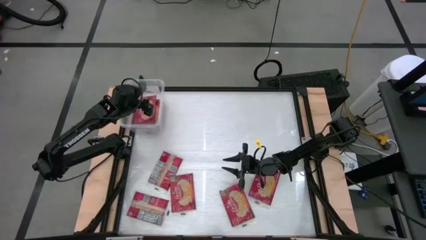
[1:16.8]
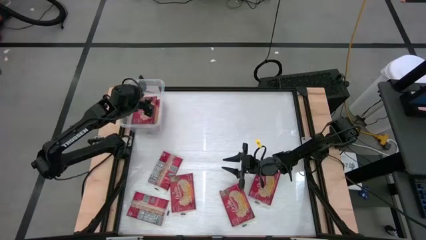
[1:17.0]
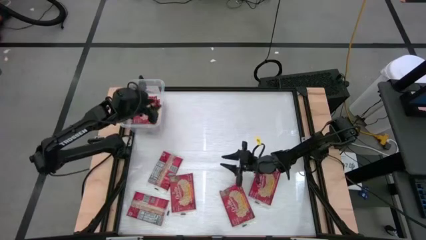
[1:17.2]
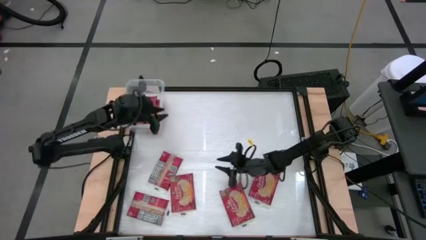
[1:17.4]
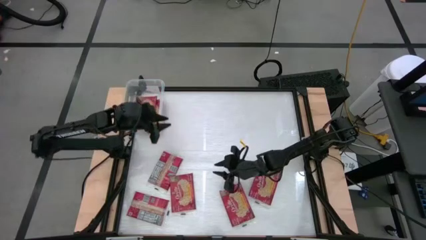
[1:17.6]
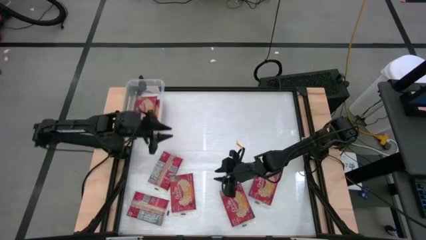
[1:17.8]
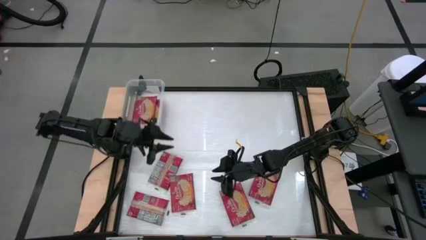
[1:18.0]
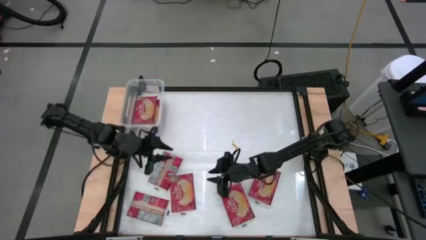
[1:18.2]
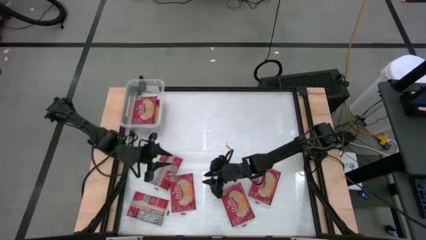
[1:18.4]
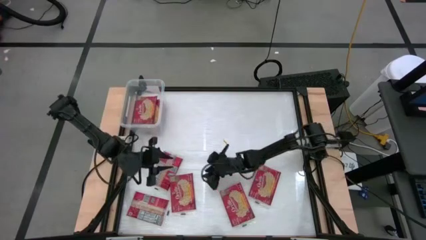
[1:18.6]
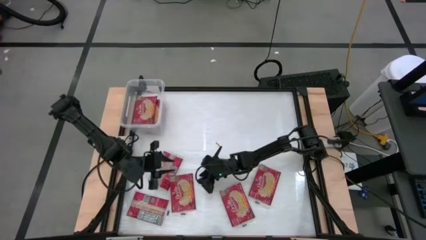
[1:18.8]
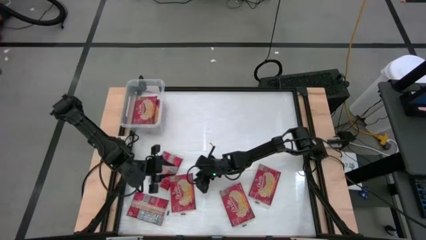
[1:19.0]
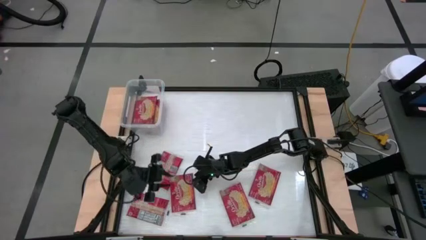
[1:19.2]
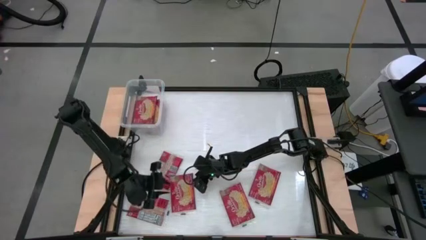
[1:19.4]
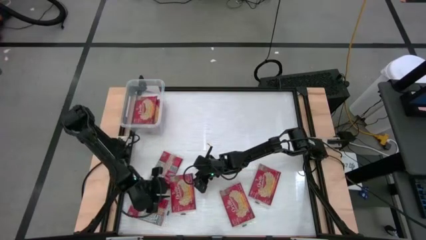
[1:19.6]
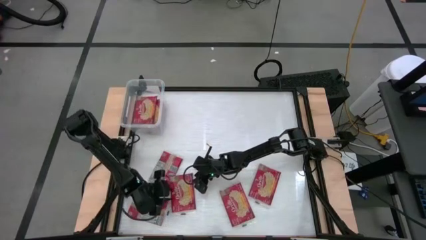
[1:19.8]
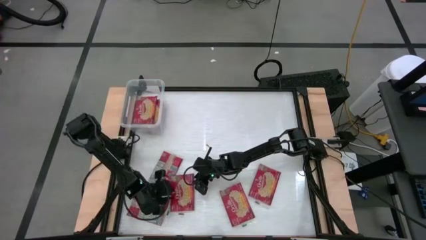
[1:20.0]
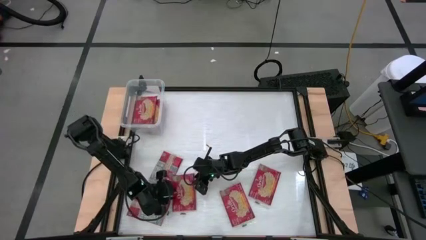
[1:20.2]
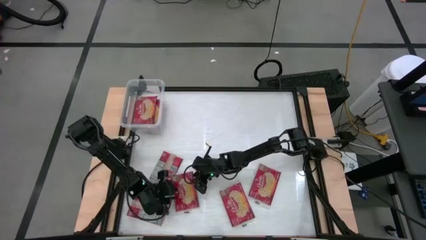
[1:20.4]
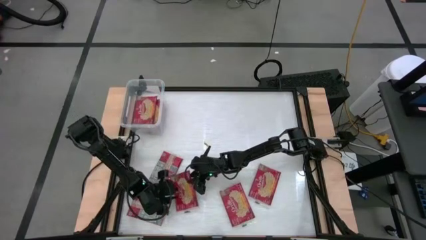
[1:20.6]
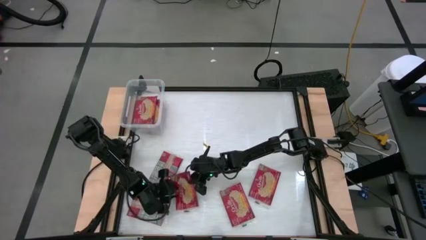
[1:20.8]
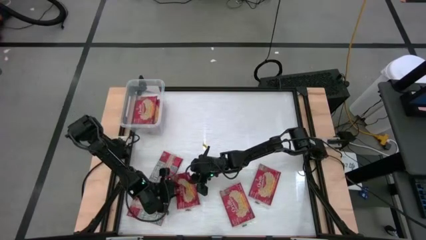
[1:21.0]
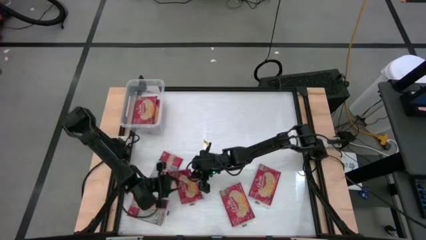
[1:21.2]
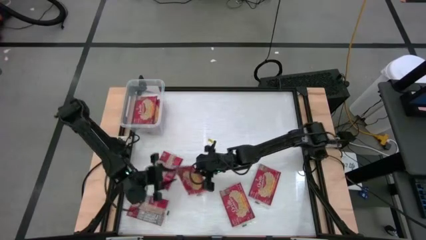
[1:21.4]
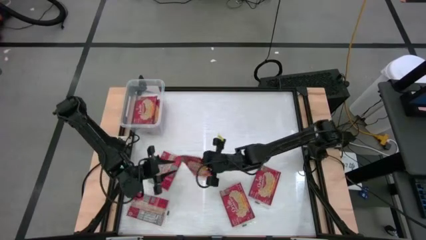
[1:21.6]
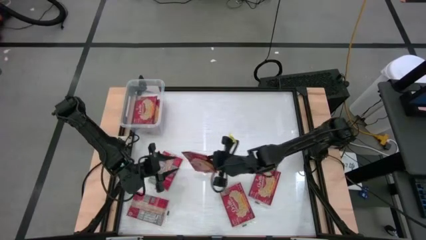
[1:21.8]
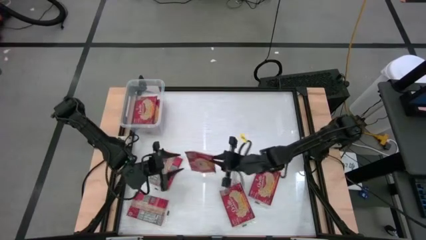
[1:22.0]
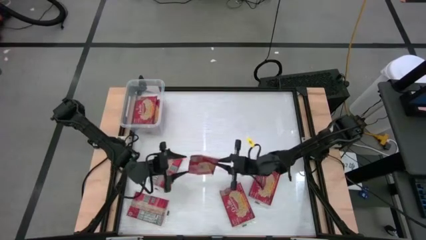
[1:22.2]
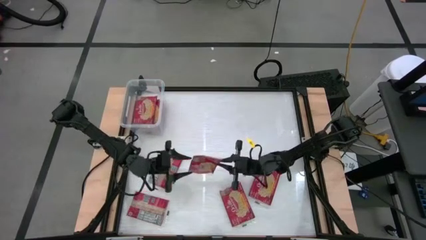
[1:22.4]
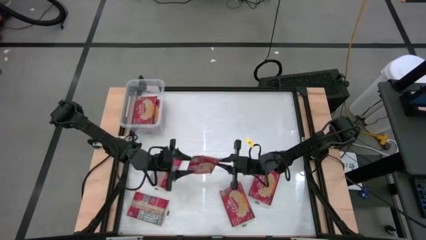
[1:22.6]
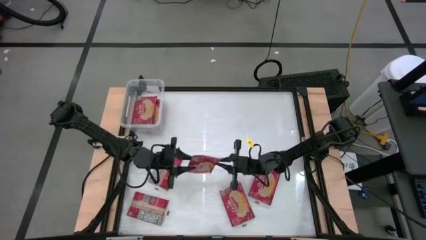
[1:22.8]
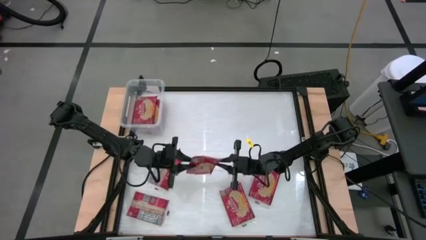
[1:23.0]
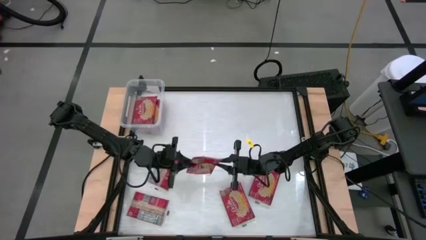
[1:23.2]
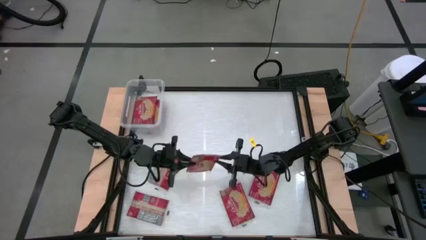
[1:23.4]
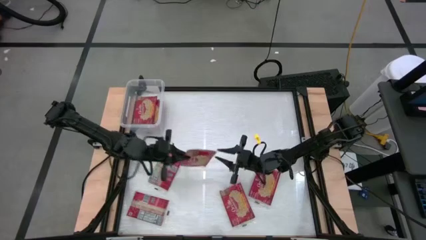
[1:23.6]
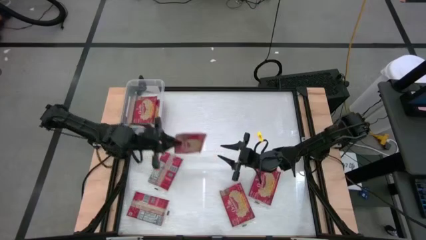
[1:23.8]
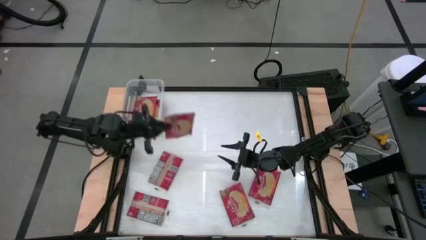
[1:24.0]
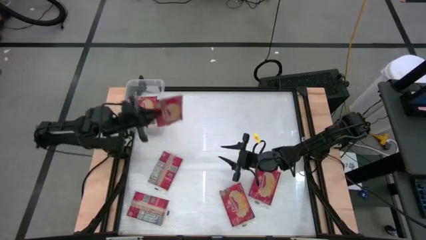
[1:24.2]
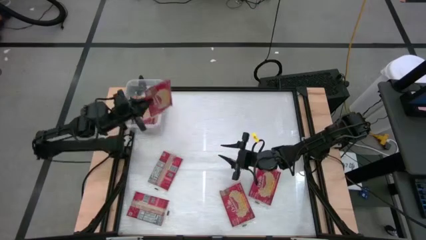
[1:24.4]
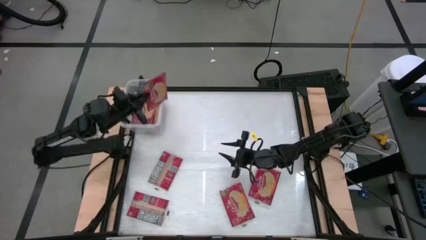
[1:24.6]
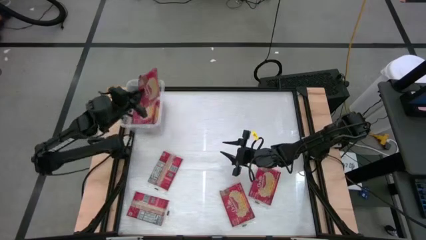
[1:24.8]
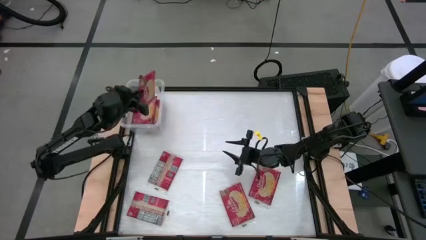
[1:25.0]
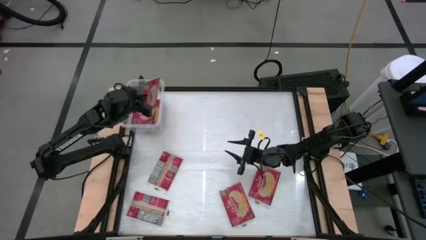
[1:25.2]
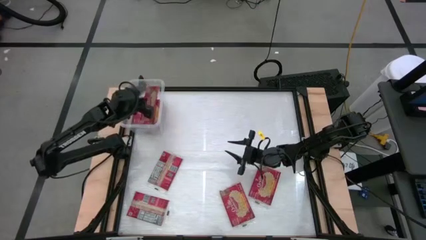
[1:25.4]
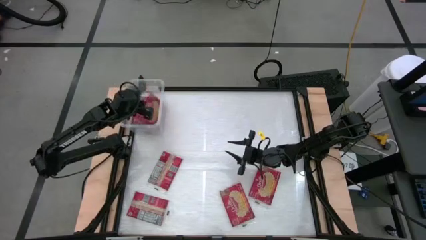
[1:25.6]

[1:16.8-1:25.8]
Task: Sort popcorn bags into baskets
Stack the red popcorn pack into the bin

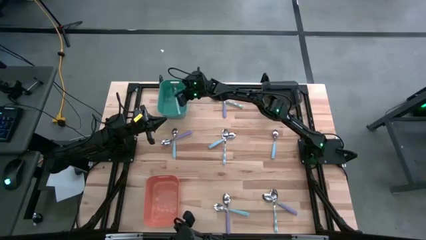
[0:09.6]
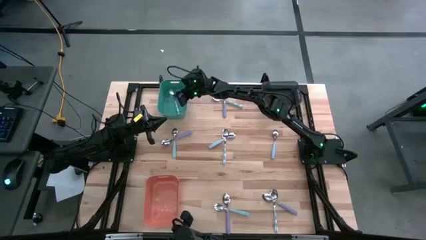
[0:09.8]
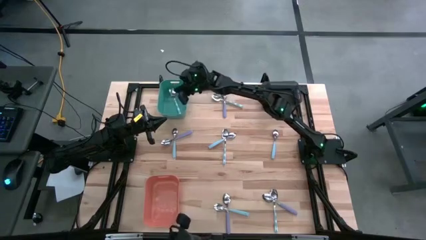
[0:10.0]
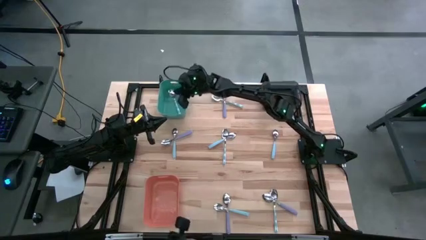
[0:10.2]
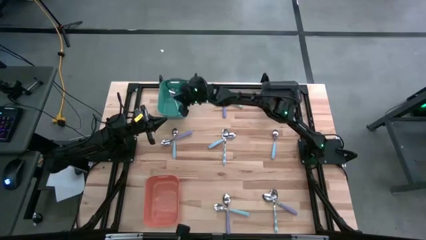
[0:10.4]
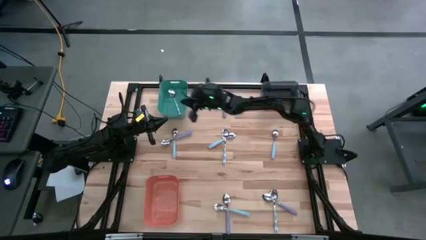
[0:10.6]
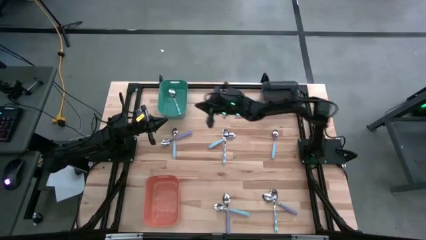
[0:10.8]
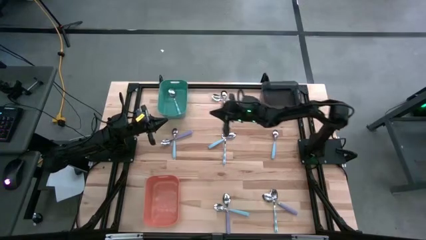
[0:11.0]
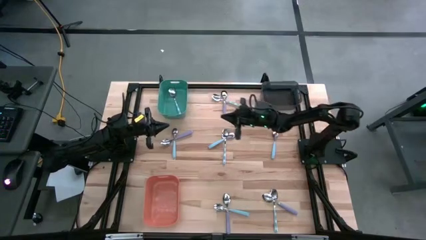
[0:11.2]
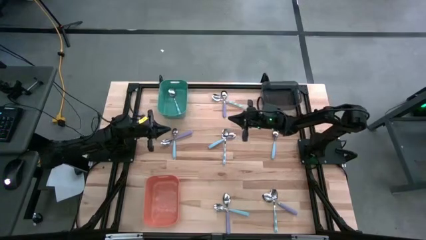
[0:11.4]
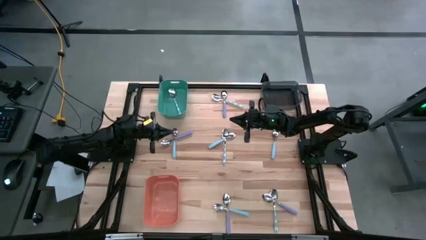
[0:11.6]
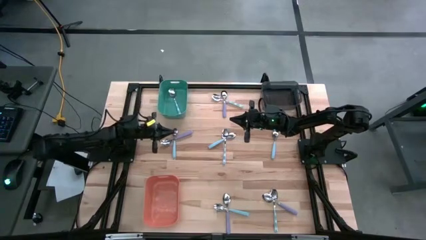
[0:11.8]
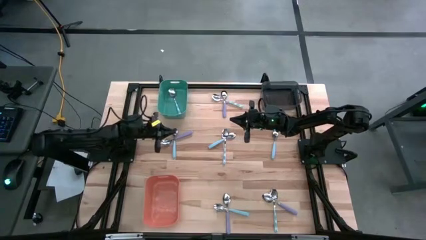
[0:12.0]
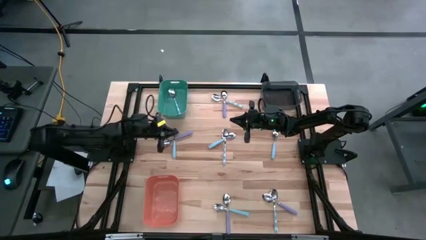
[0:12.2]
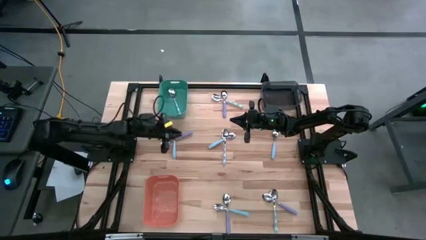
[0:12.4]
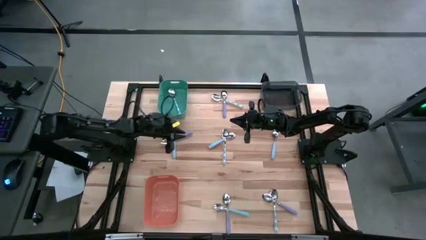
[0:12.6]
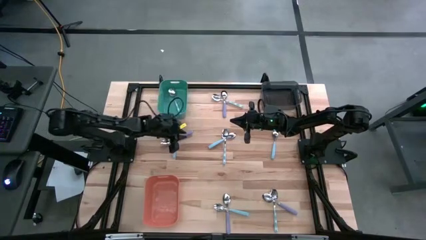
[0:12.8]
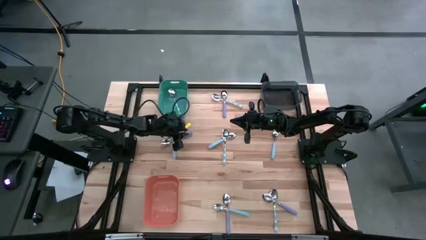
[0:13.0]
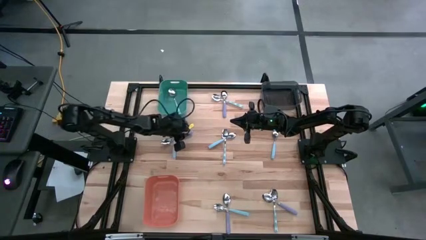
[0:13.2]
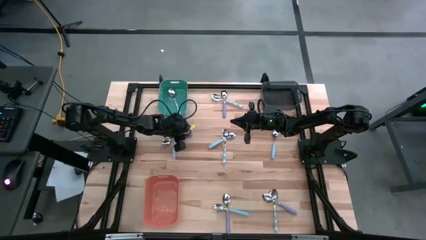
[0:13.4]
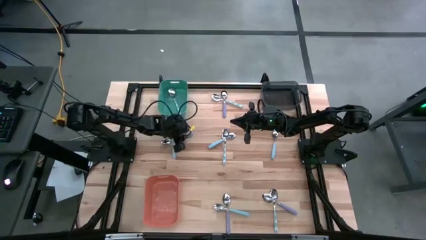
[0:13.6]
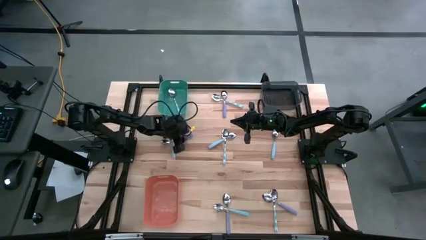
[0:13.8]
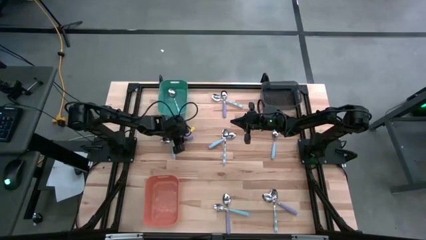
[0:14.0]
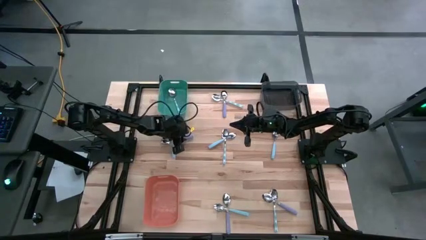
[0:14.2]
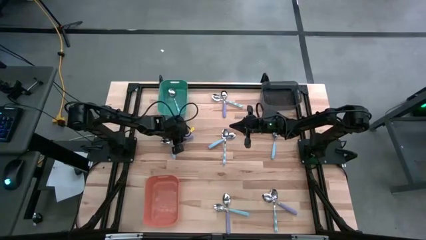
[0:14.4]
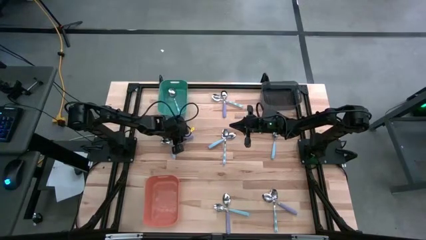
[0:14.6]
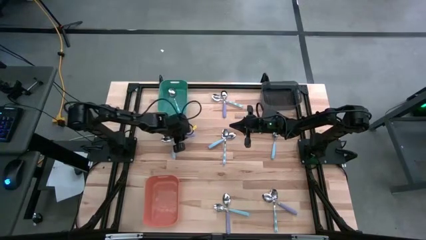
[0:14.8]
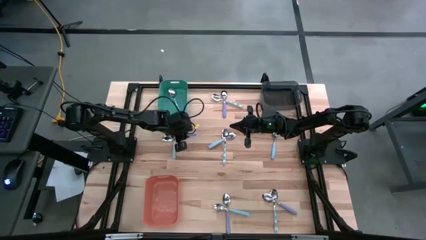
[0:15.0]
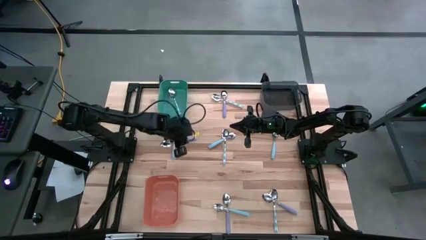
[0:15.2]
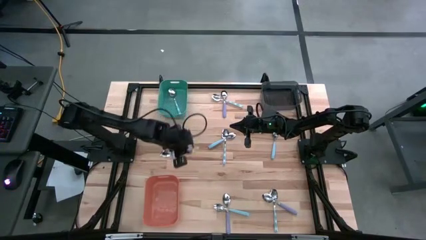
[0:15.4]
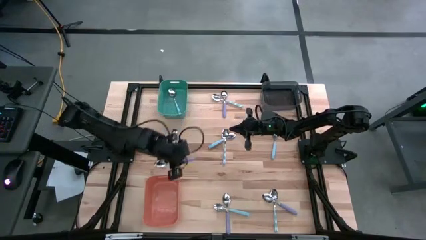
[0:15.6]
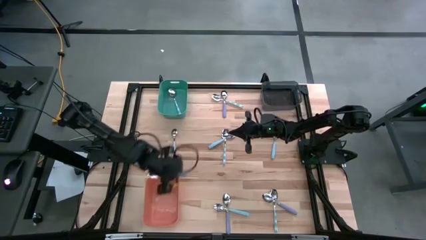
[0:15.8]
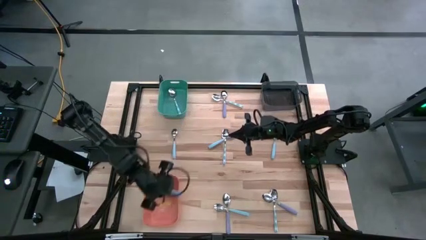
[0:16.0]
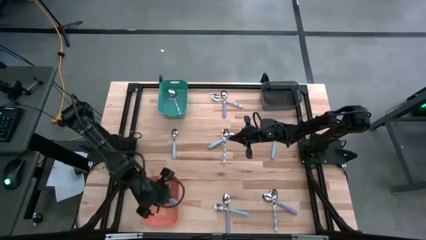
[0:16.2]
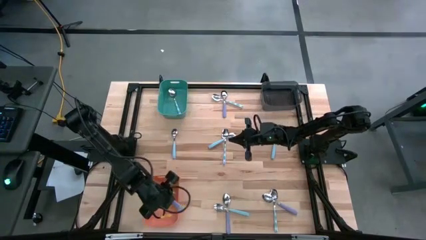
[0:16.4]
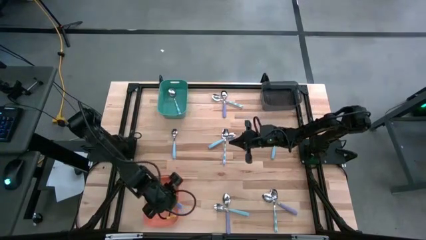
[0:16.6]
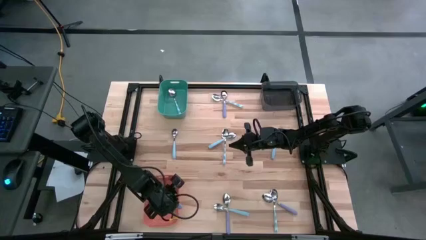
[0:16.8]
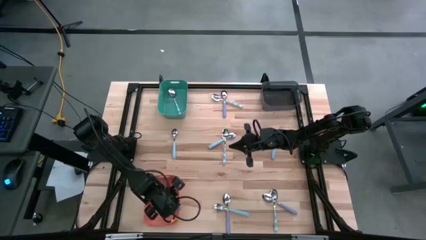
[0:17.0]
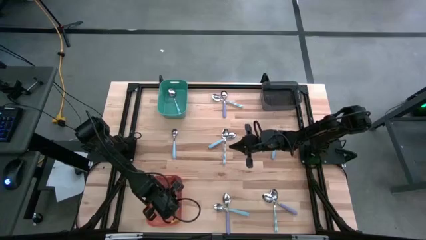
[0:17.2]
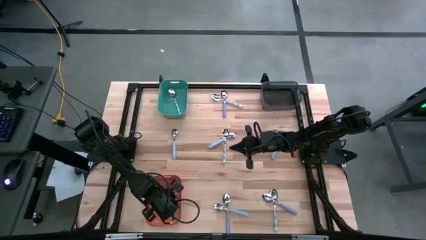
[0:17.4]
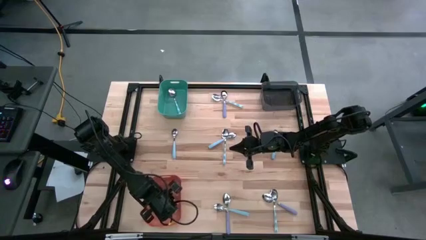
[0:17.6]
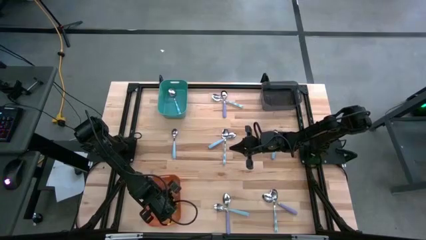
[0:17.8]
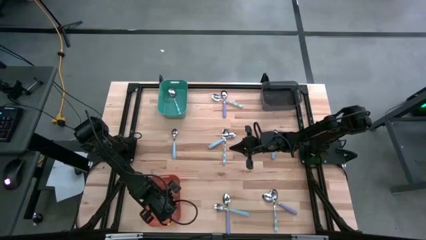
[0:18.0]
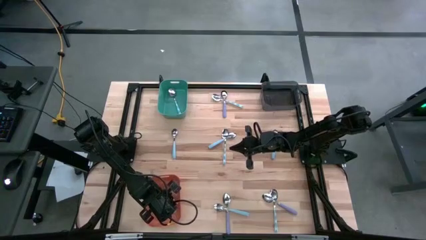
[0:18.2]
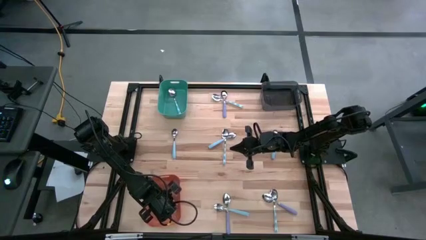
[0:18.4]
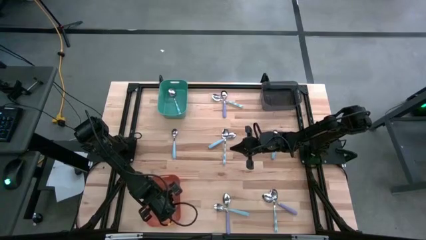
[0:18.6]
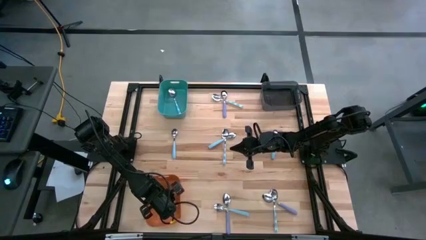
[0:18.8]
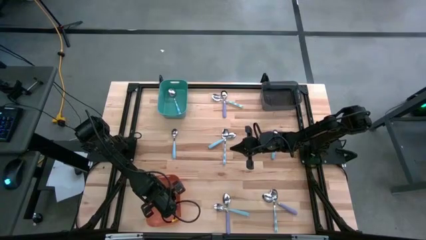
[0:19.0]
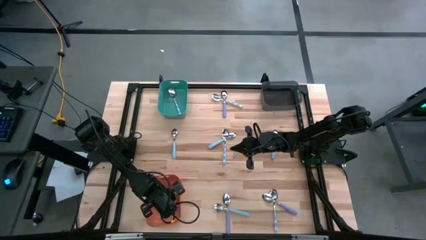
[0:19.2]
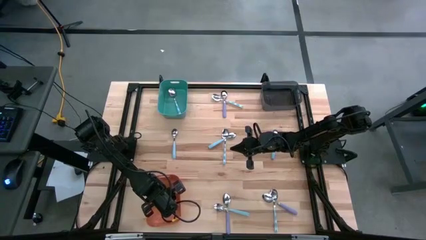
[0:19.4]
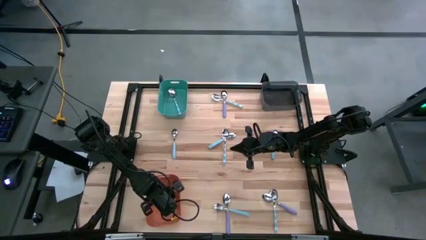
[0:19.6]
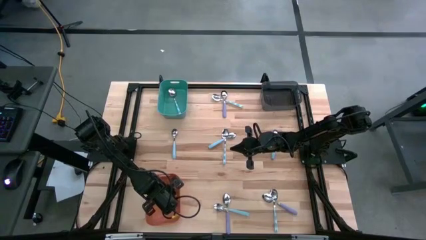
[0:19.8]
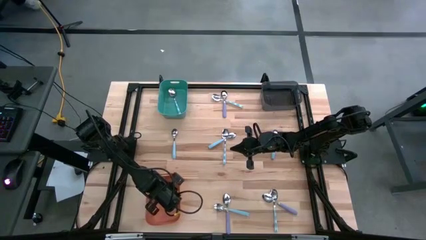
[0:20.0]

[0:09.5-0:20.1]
Task: Sort silverware by color (type)
Put the violet spoon into the orange bin
